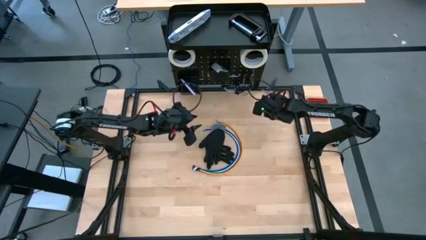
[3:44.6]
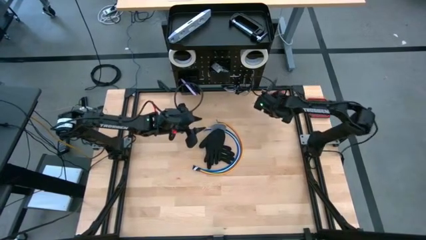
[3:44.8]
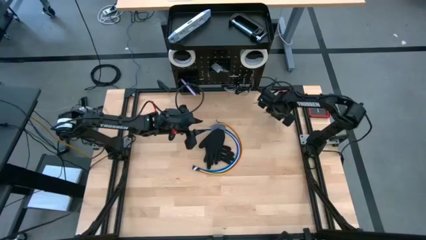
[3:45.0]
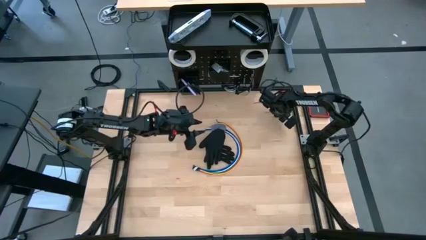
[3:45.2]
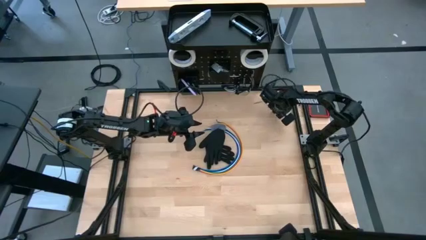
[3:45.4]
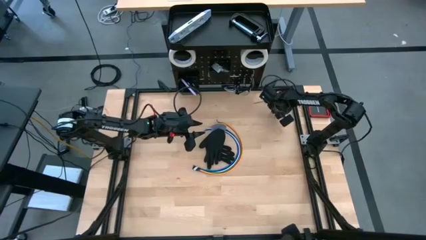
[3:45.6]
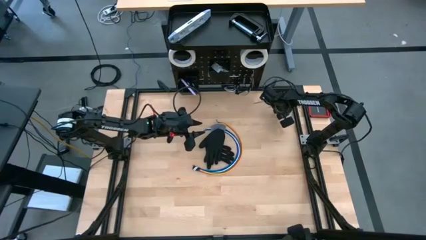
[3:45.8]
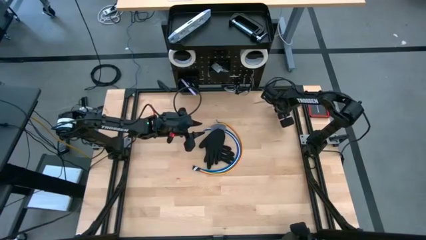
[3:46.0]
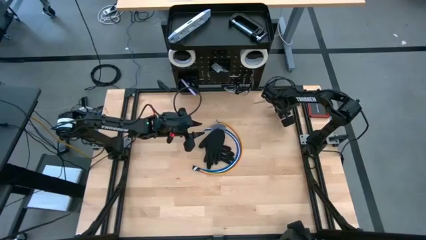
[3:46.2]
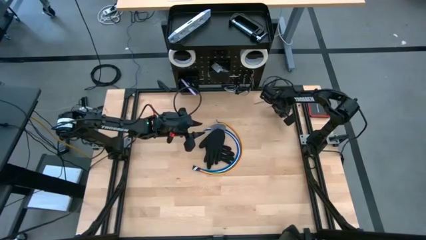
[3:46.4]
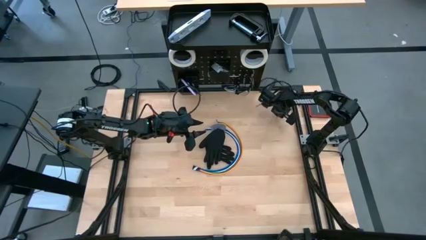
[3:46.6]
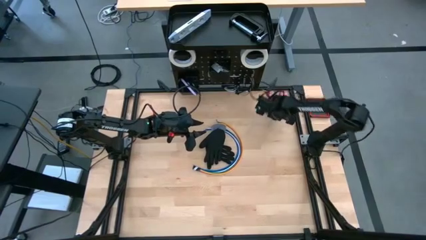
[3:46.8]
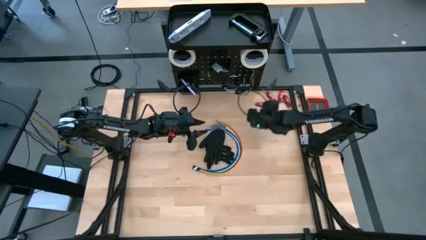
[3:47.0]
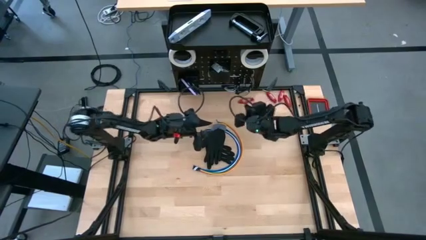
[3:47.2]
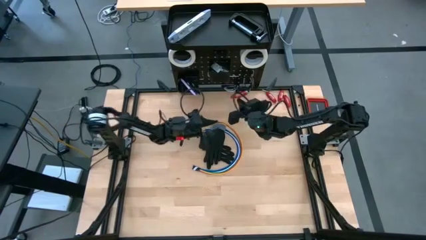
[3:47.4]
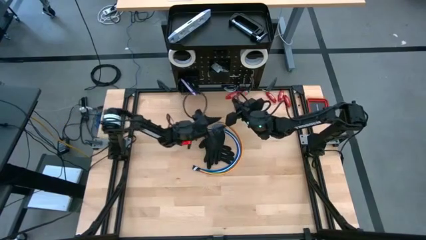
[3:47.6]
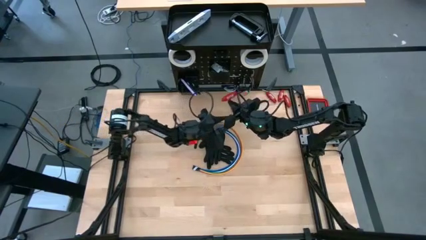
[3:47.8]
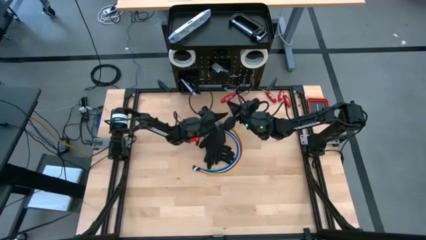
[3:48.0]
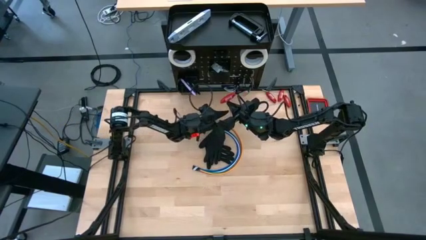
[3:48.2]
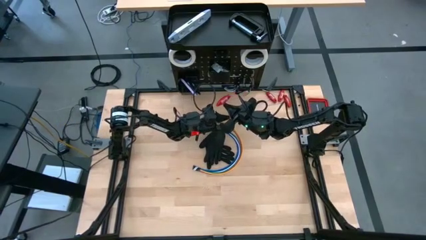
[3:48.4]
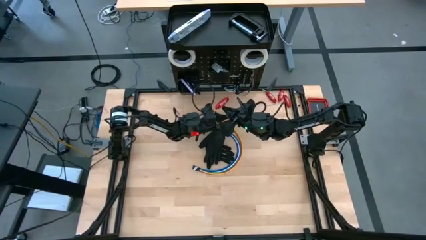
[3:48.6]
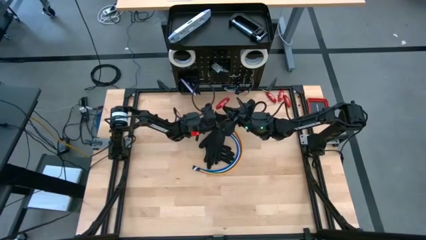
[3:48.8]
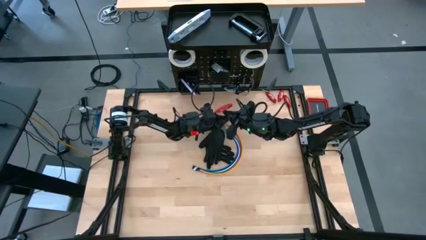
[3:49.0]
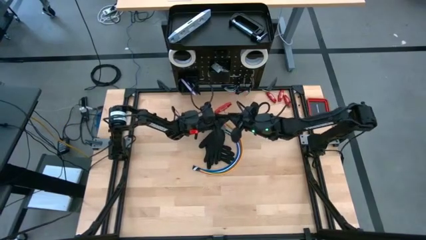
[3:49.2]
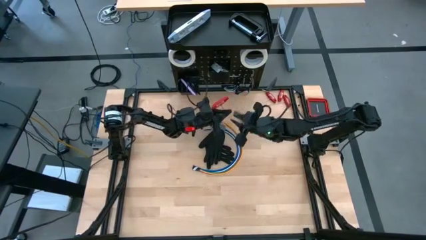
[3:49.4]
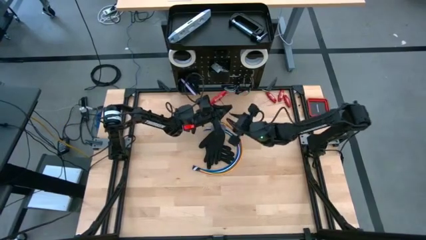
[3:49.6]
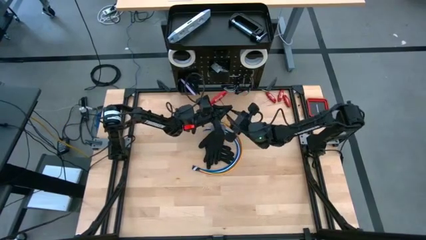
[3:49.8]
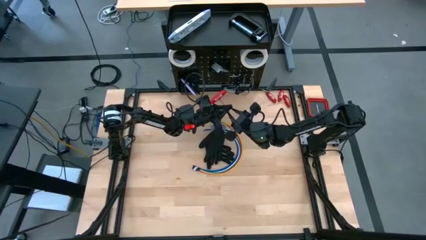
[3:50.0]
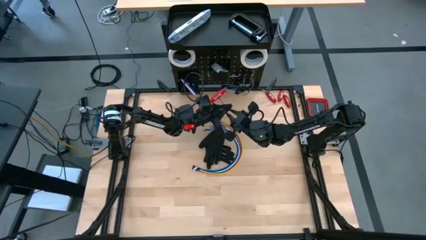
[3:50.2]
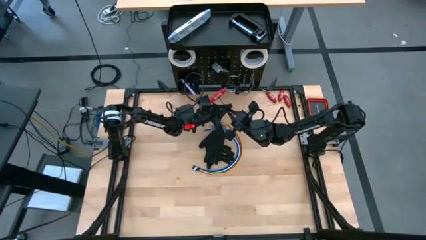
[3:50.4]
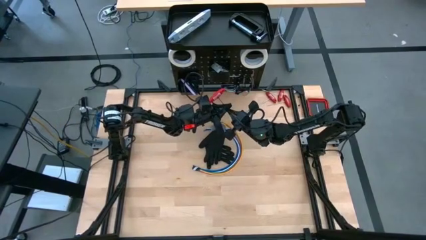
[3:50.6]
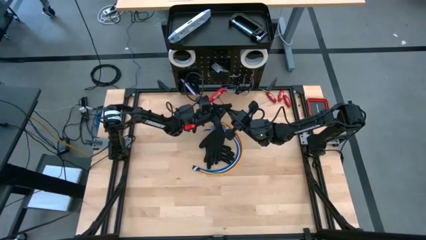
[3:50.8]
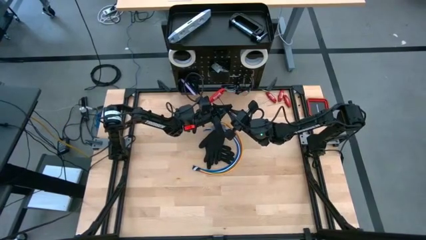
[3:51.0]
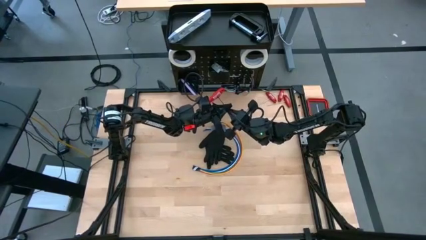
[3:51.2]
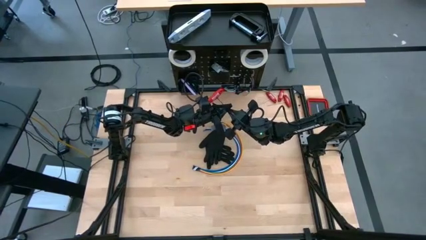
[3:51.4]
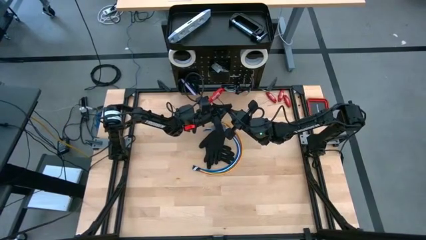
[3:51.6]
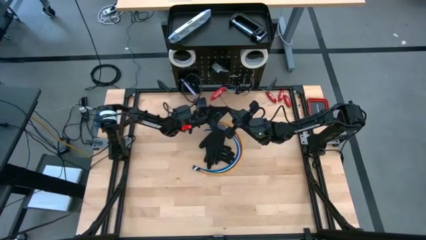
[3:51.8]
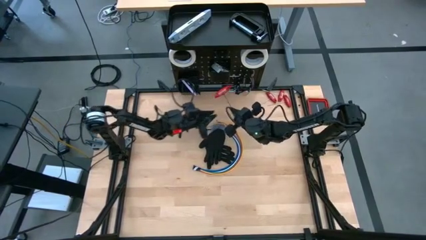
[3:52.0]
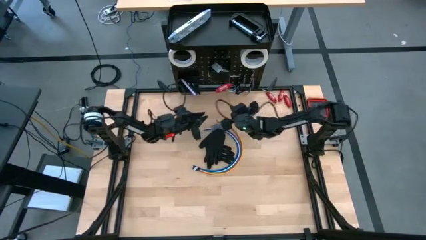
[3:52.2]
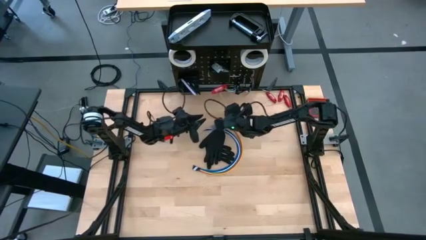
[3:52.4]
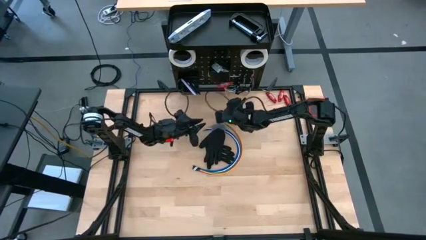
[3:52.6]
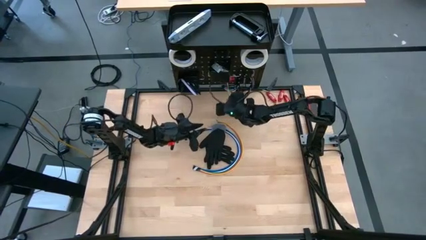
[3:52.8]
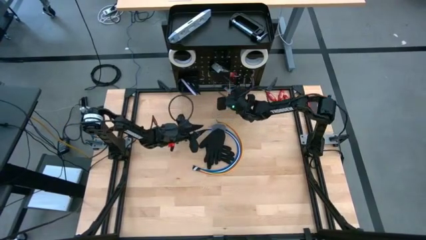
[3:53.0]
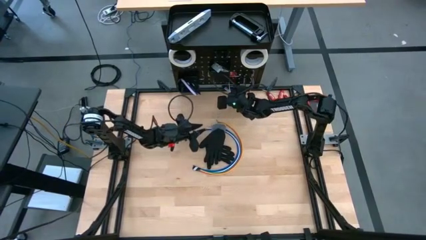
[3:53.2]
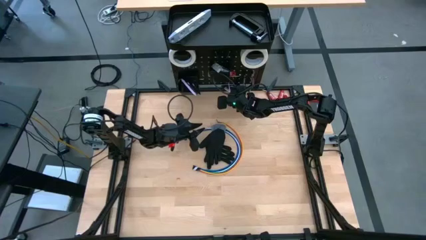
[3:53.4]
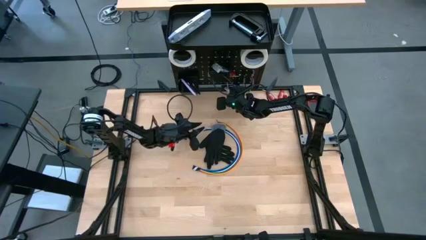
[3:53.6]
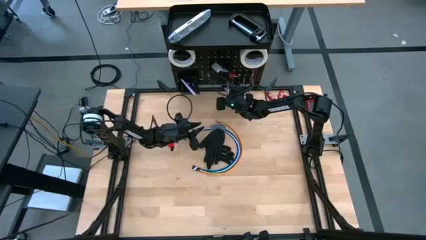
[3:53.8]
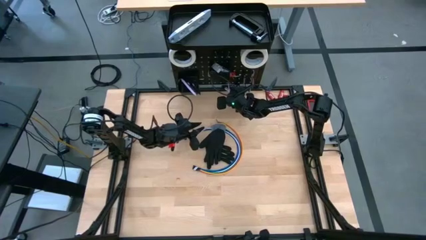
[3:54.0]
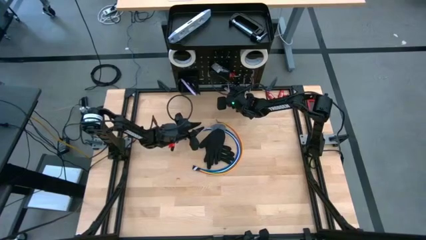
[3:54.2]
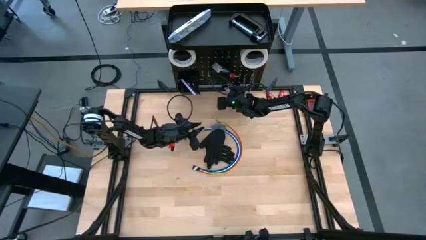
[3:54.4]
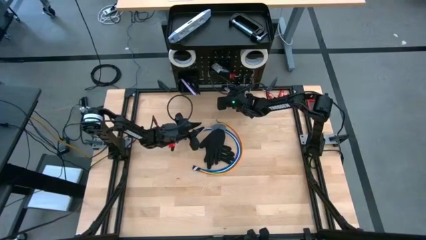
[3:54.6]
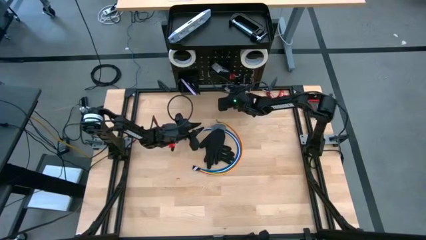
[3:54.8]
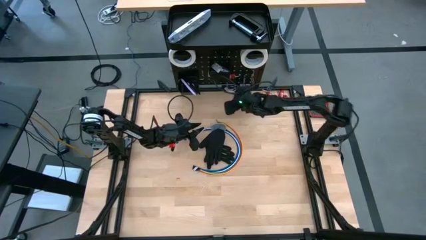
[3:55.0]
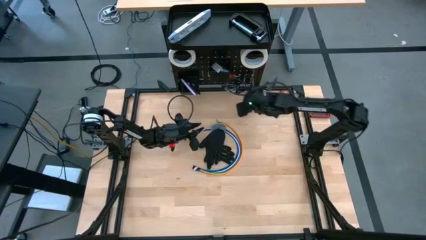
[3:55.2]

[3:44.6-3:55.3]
Task: Hang tools onto peg board
Hang the red allen wrench on the peg board

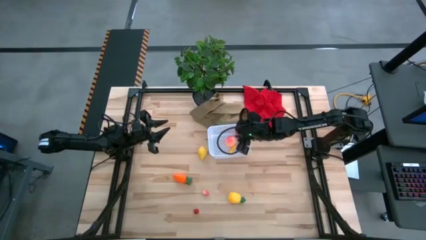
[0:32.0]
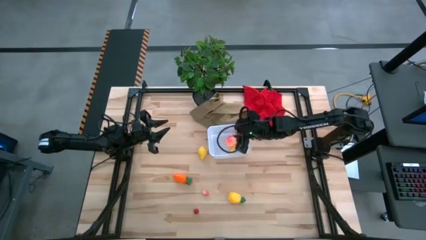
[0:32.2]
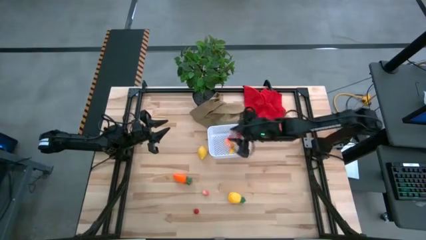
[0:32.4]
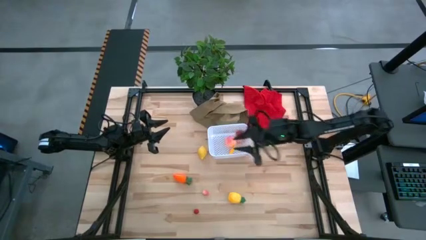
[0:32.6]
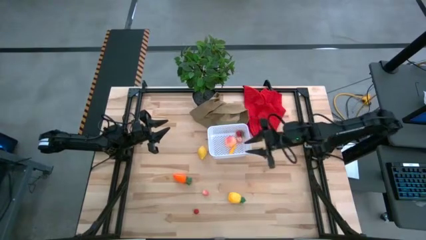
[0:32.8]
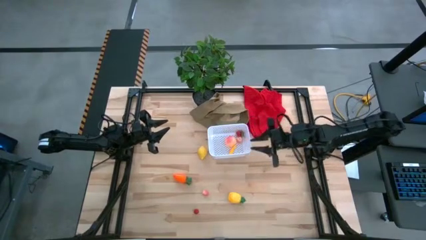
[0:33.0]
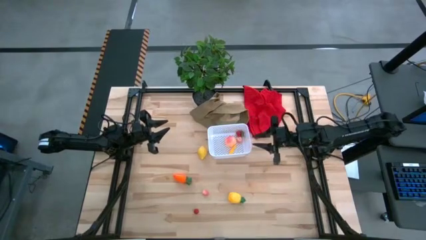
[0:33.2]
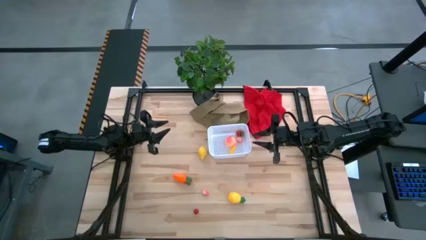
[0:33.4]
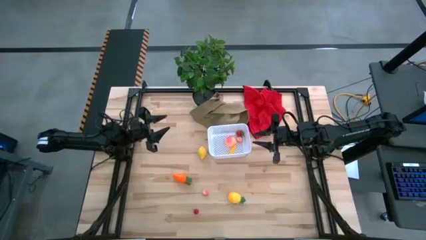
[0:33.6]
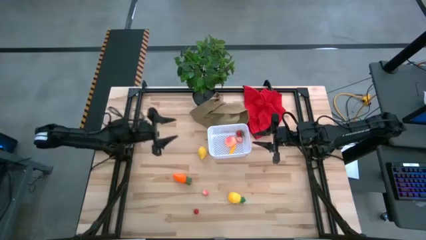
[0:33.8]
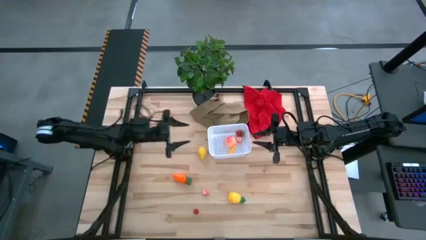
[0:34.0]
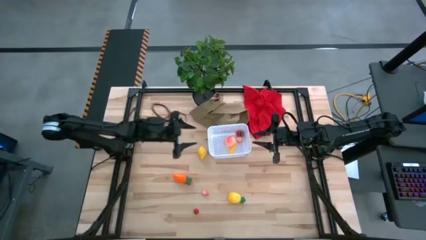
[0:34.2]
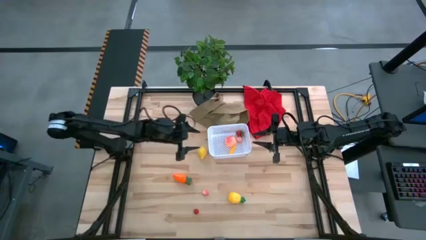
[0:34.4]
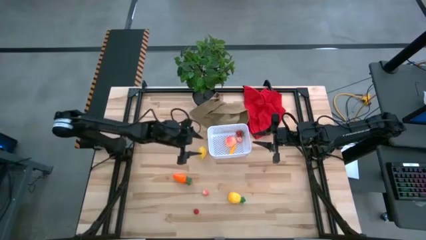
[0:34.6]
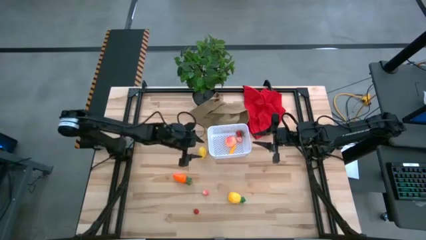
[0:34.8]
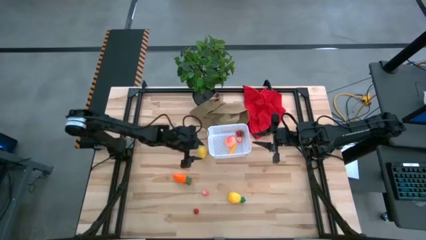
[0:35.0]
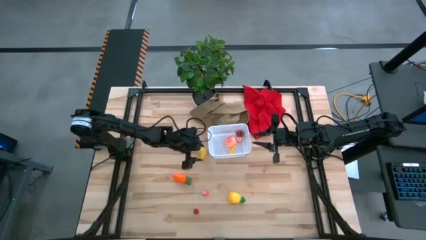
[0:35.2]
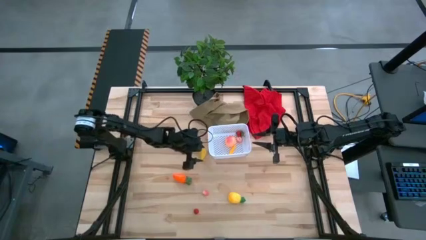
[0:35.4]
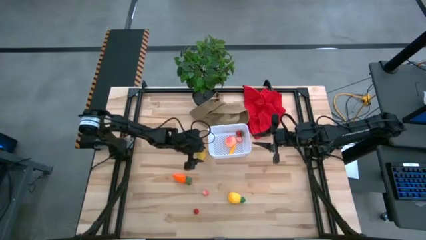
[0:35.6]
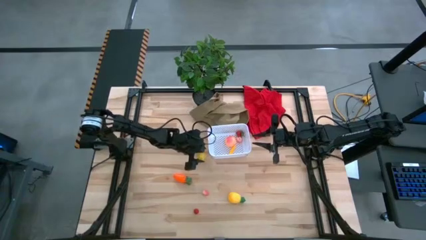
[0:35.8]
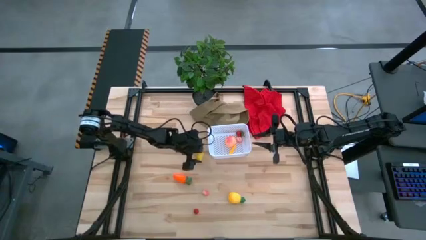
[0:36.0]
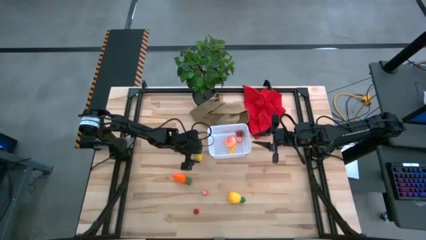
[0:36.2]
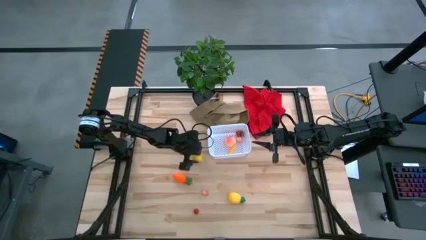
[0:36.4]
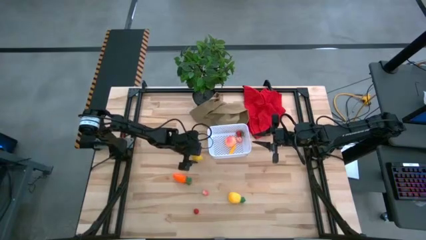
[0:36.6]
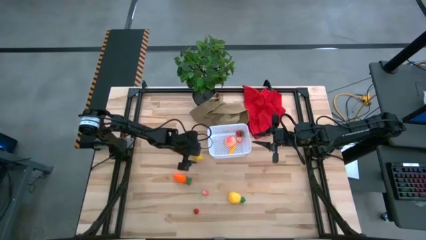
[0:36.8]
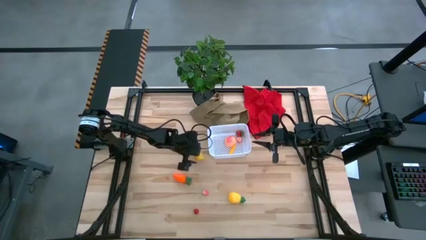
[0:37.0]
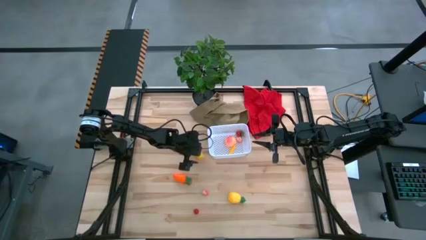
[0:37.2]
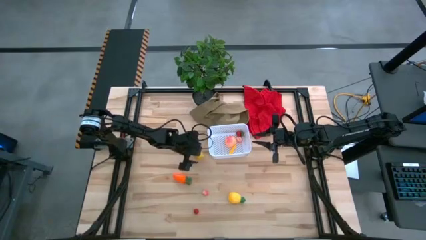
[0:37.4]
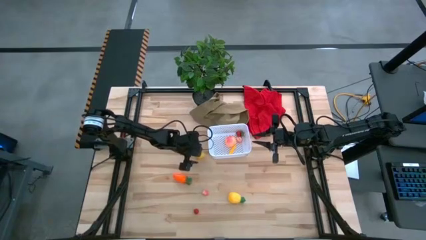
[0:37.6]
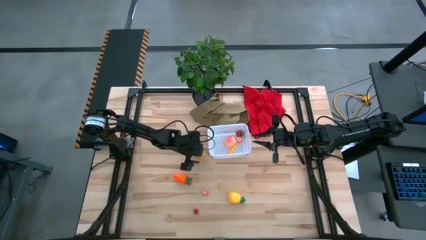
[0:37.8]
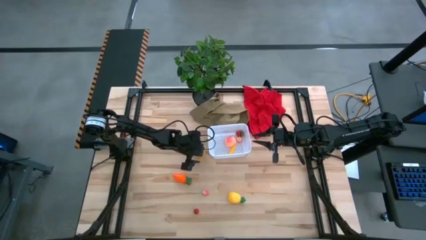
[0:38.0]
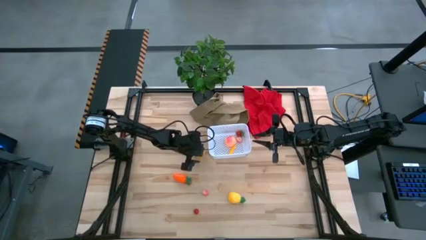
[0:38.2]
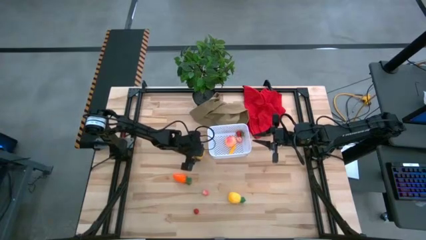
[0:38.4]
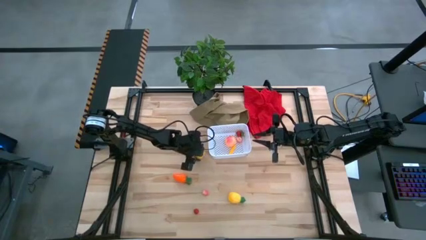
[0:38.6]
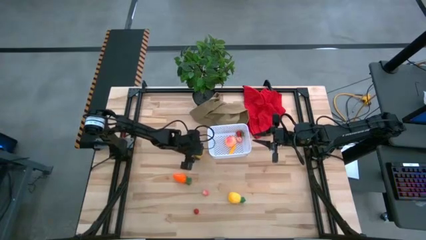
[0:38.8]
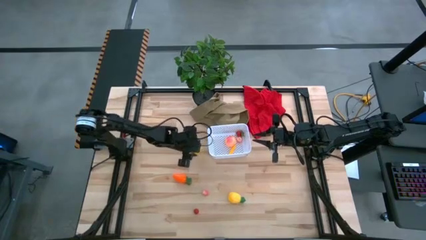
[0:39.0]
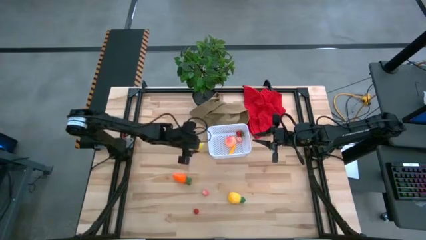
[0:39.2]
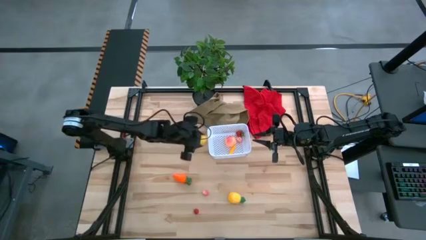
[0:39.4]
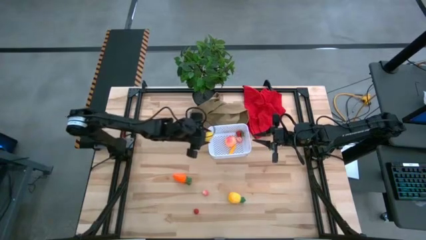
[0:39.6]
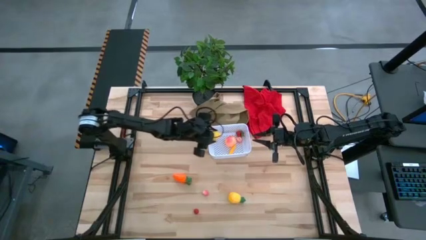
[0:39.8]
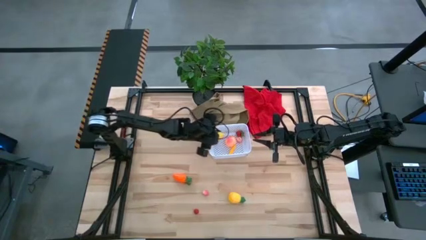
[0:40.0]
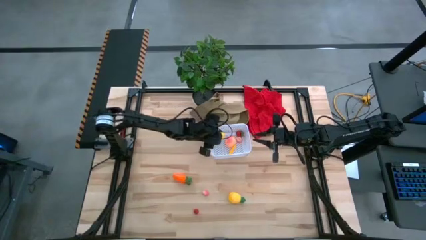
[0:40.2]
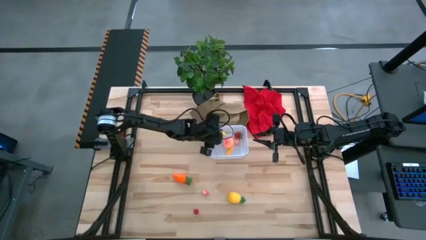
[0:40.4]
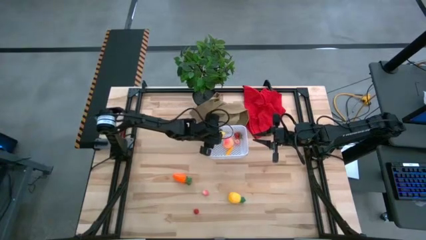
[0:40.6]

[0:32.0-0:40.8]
Task: Pick and placing Produce into tupperware
Put the lemon into the bin
